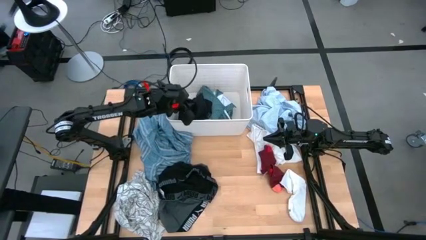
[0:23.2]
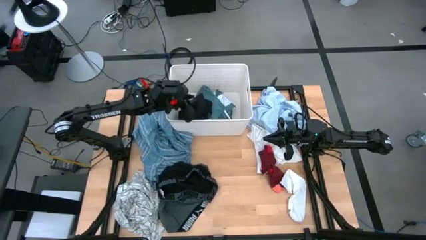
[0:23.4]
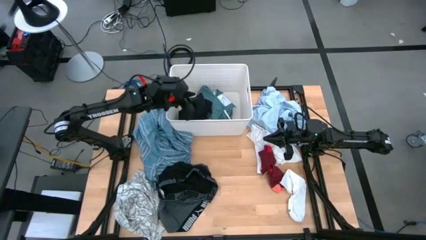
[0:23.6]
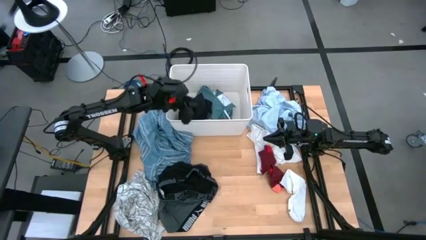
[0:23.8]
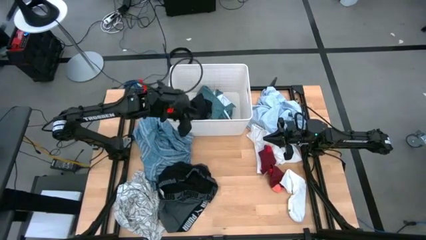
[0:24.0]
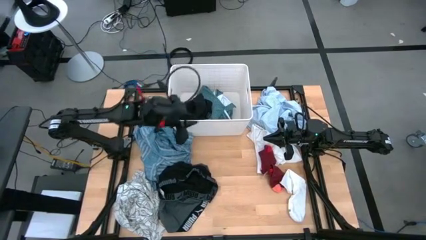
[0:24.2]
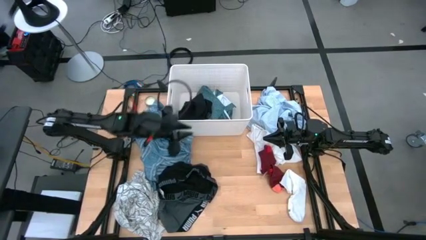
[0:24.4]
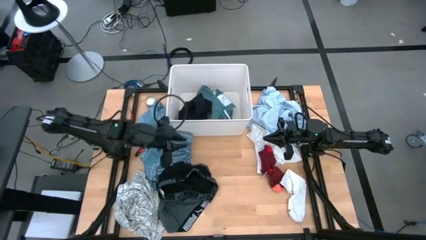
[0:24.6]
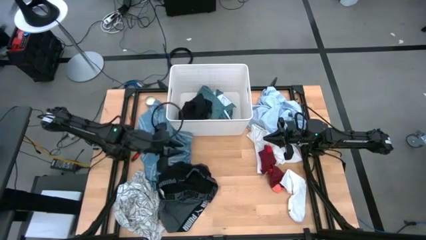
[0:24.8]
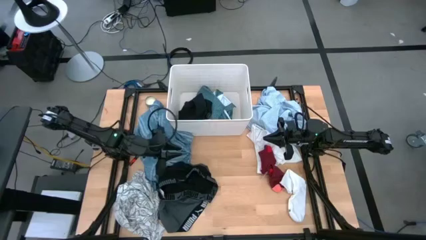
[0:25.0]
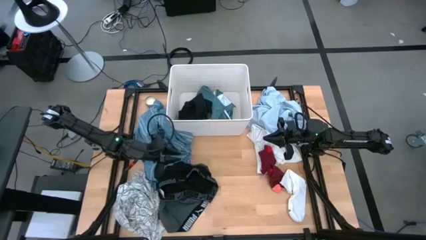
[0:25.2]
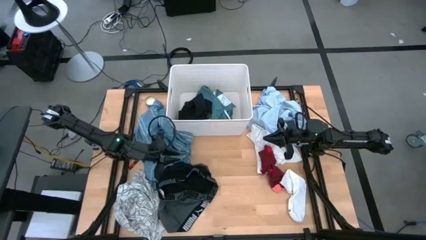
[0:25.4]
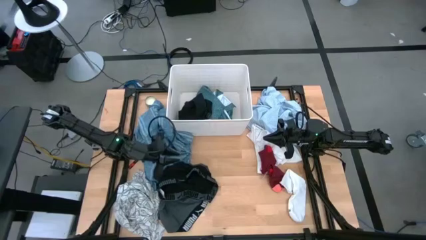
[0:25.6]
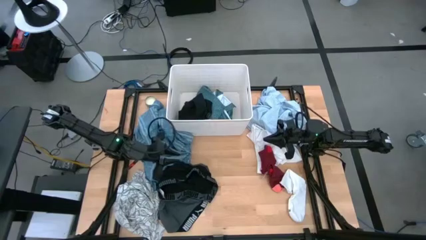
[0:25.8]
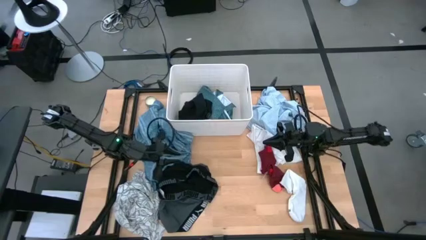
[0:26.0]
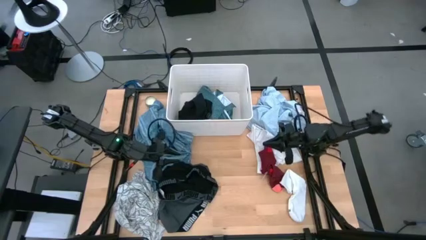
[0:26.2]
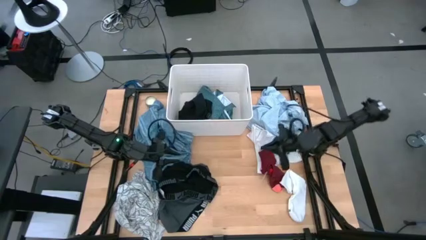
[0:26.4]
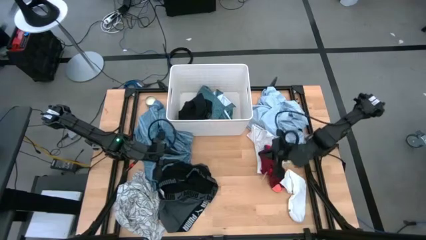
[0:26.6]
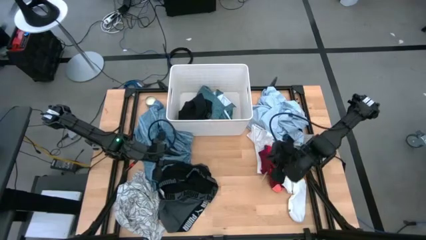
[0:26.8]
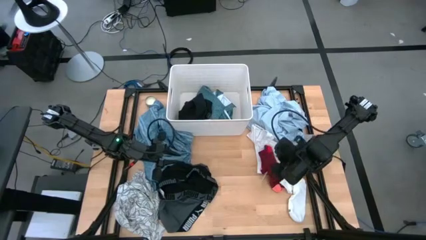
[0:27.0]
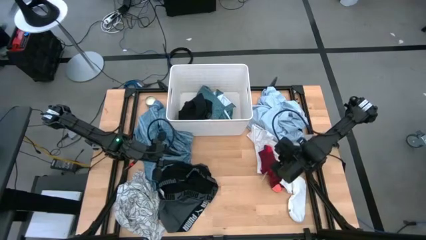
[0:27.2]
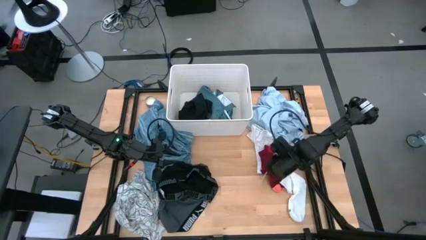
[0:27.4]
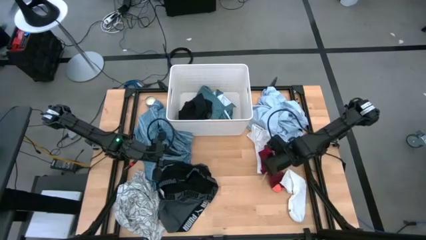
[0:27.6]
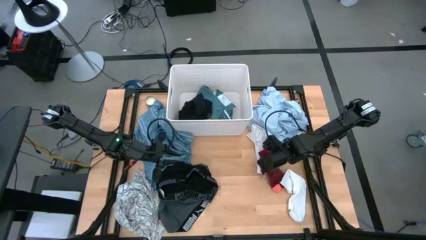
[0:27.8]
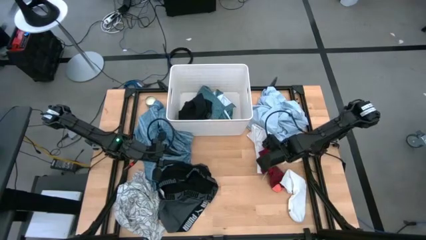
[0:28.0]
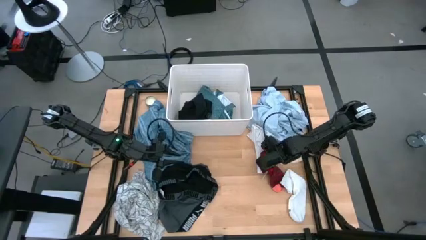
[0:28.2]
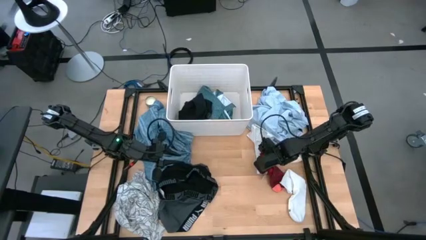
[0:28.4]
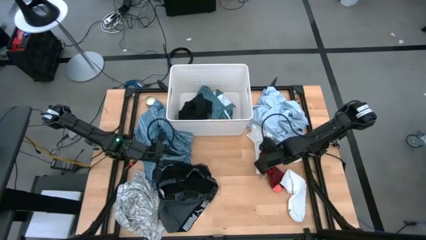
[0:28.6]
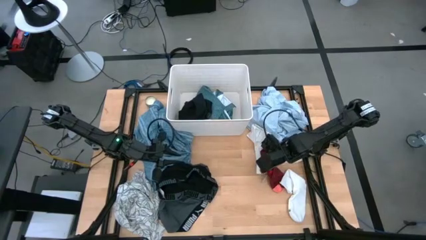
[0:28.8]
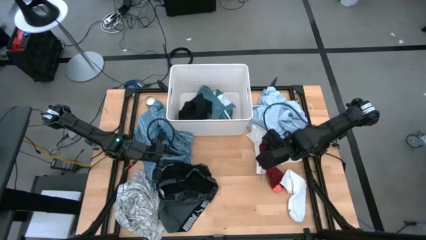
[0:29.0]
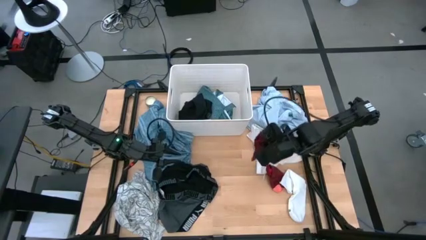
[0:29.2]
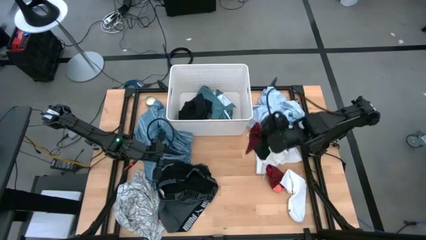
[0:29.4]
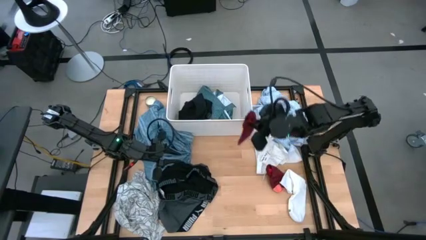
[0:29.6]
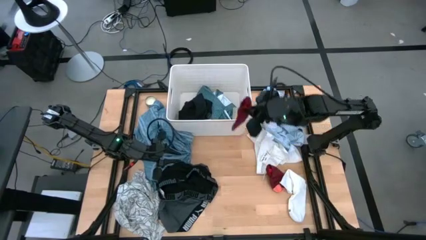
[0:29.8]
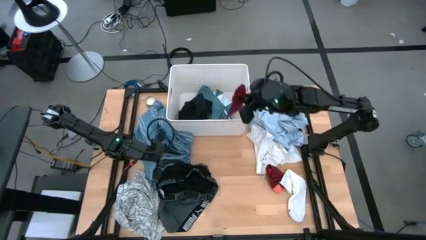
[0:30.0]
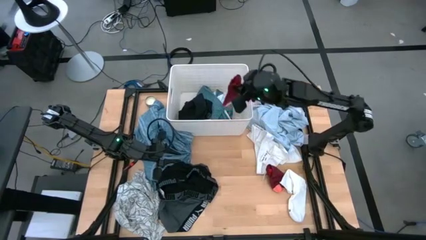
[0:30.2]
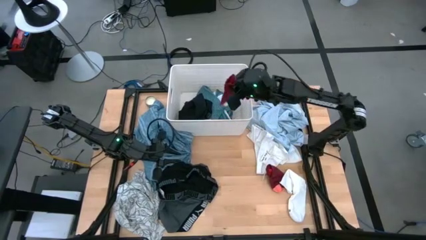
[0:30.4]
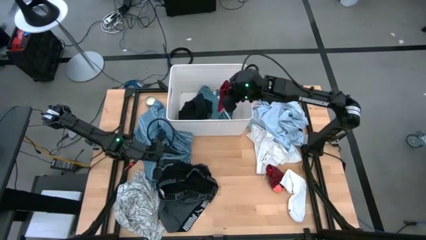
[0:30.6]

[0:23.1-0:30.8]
Task: Sort clothes
Put the top red sock into the laundry bin

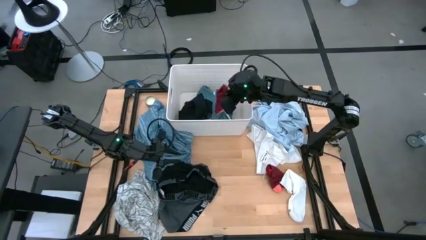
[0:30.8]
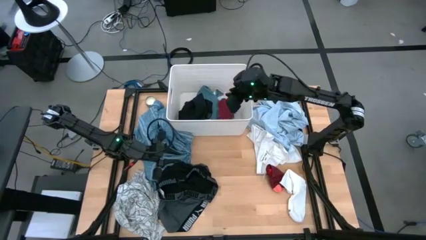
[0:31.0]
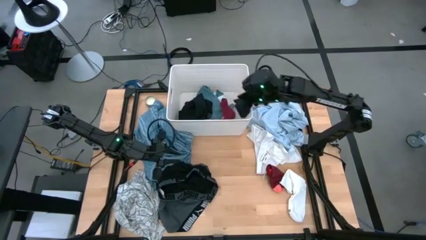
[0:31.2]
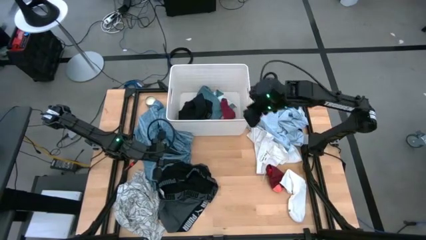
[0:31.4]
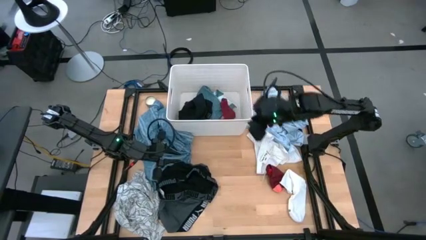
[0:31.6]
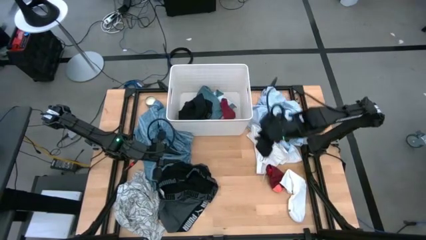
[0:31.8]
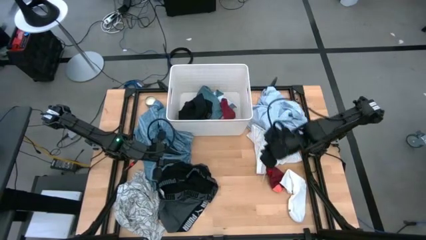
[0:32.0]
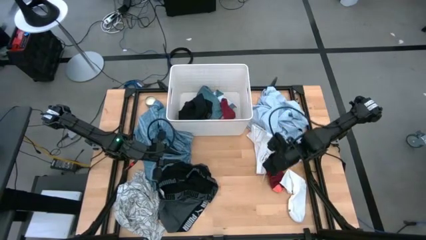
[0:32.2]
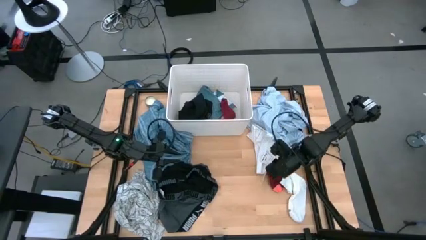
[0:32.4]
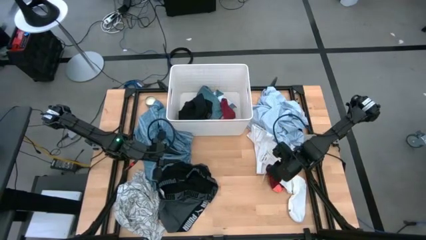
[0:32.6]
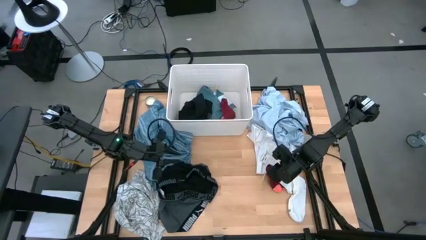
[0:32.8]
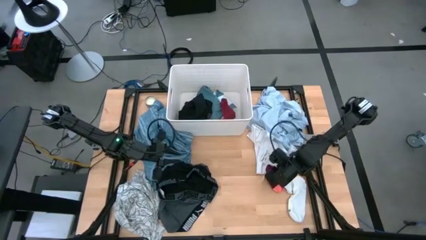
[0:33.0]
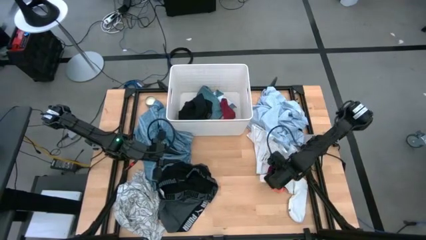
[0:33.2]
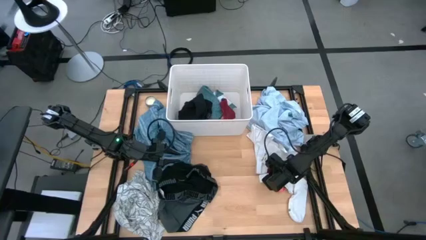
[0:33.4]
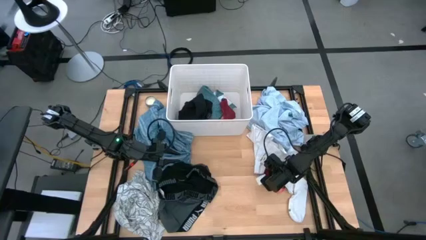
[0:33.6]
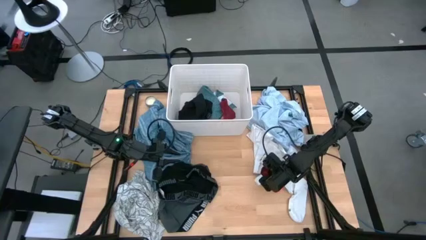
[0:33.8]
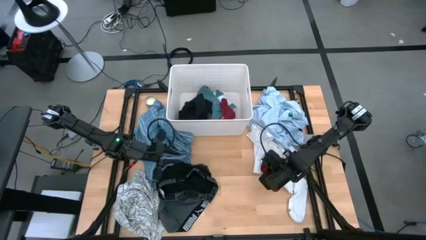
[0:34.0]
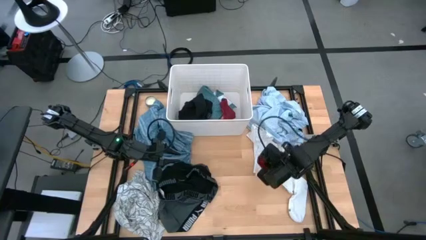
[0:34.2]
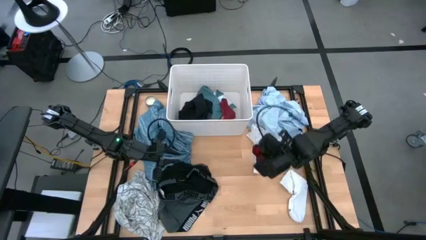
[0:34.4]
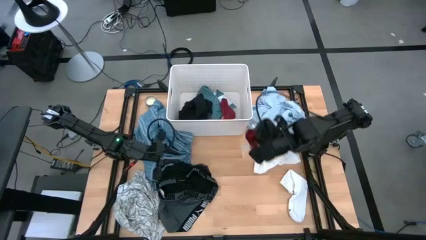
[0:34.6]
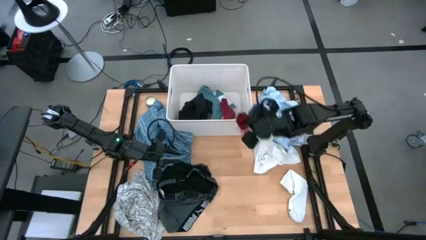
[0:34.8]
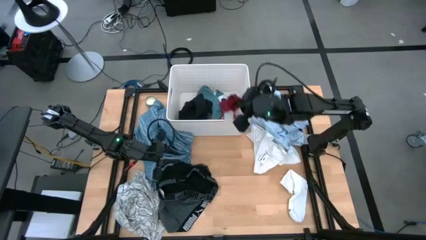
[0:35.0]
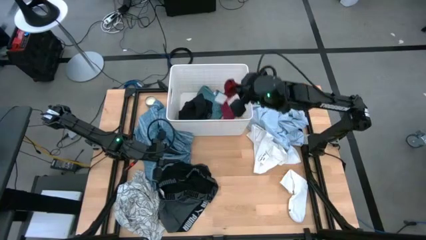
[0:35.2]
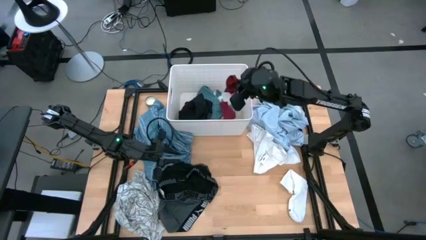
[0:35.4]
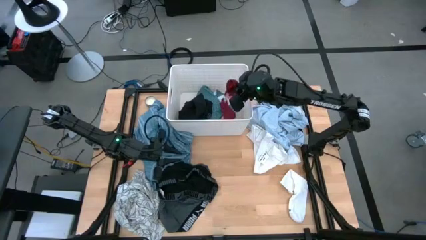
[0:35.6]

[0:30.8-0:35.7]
Put the red sock into the laundry bin

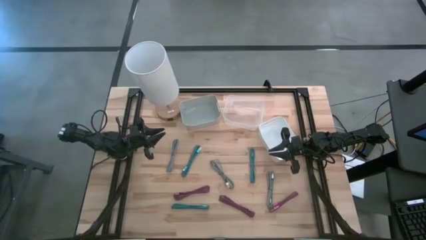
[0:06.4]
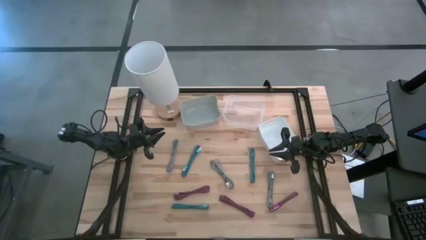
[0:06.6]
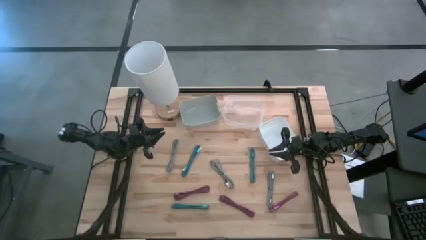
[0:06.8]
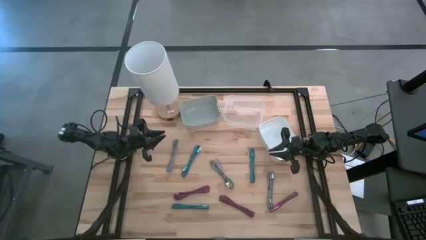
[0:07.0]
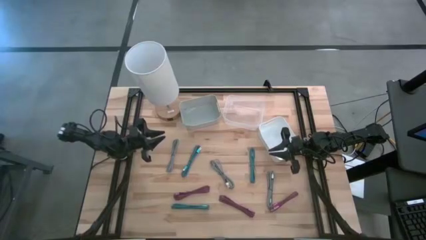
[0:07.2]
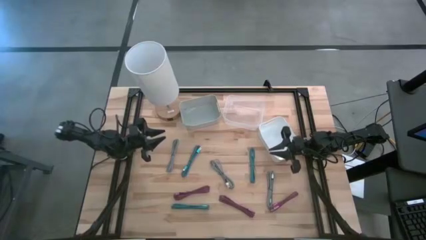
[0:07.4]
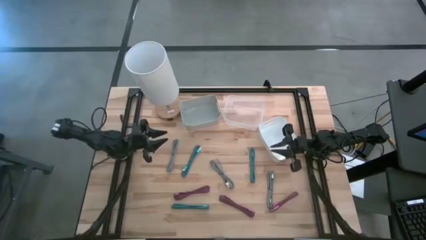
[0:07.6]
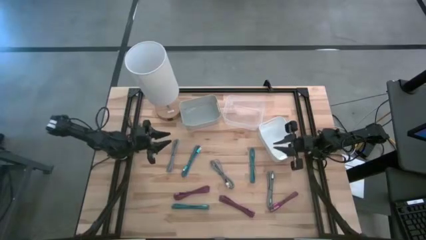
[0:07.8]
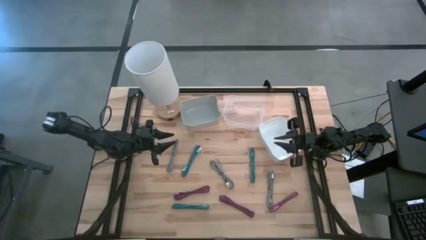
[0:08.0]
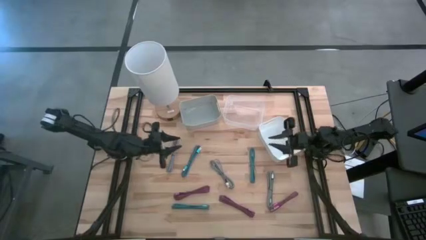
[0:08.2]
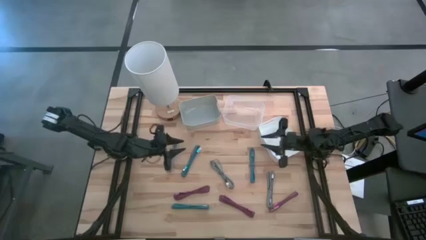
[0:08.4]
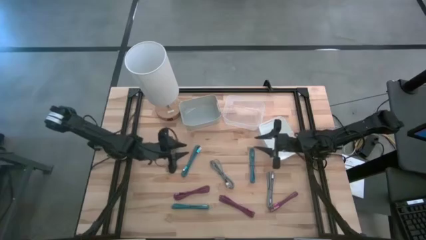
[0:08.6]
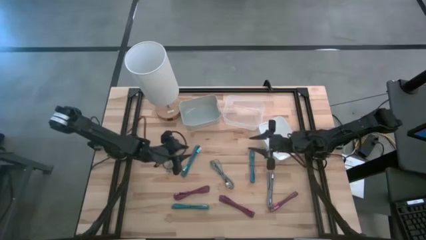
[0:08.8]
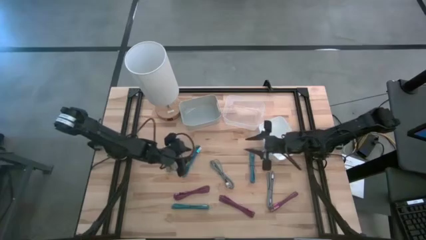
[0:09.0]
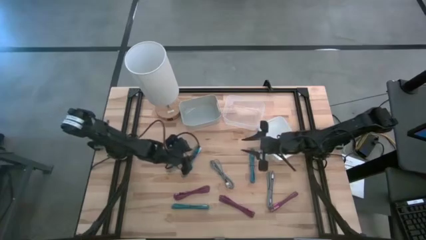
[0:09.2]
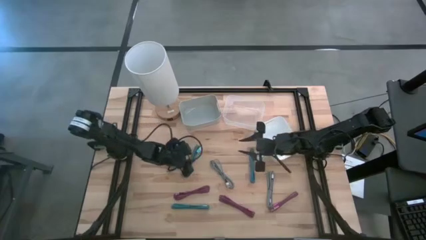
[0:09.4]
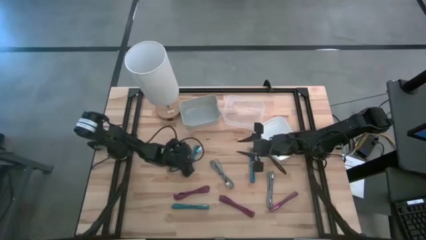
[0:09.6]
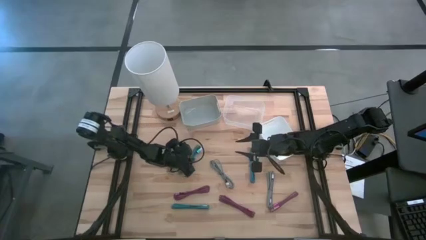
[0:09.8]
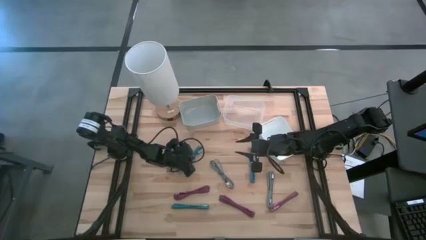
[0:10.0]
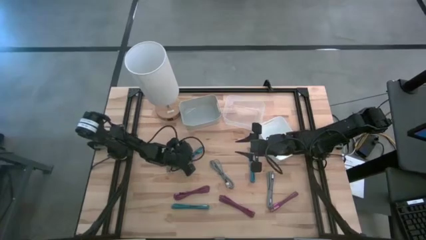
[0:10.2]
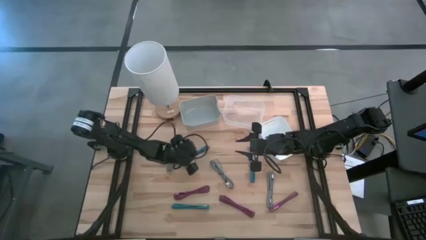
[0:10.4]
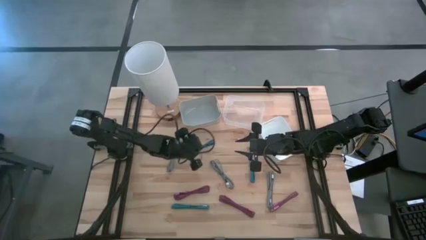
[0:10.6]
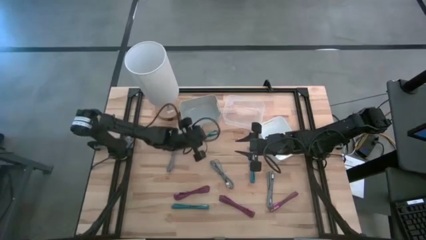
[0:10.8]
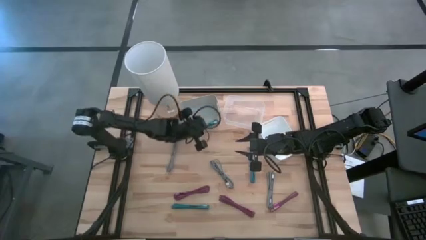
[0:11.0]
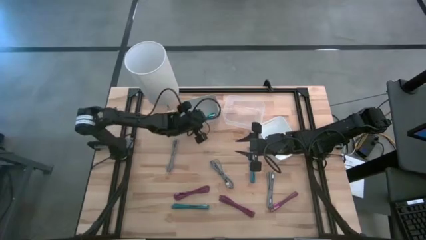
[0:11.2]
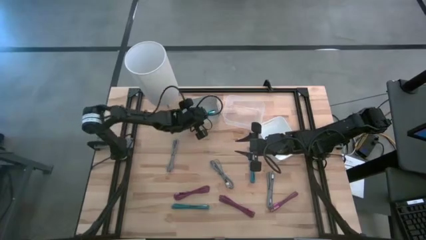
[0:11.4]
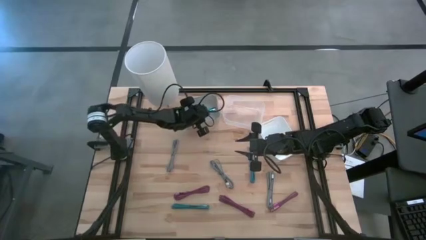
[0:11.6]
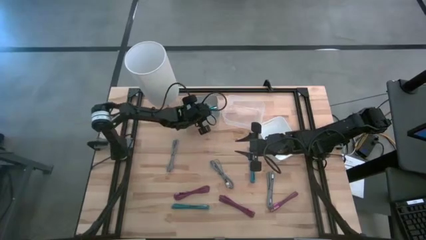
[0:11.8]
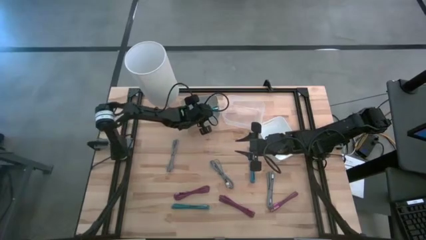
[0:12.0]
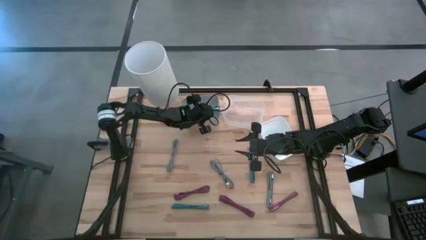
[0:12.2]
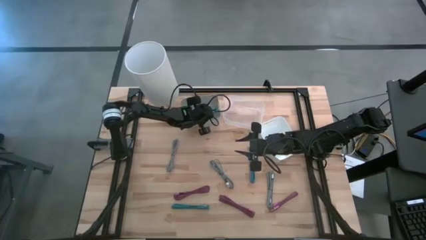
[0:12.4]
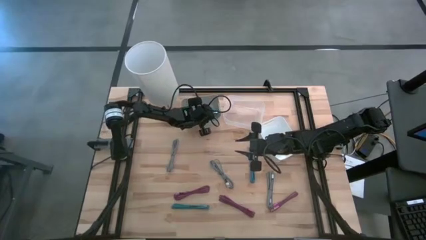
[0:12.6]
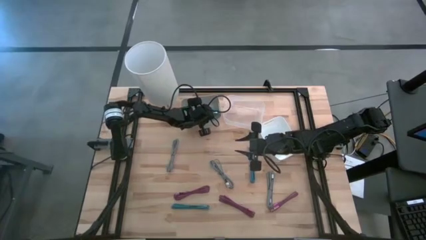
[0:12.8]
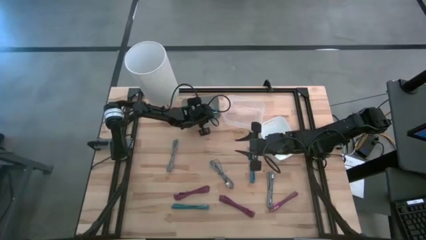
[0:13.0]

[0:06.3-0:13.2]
Task: Pick & Place USB Port
Put the top left blue and black USB cable into the gray bin
